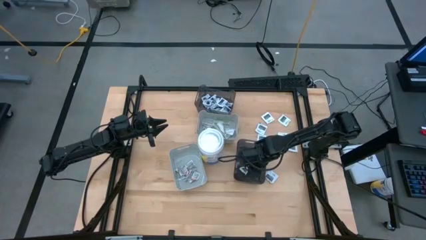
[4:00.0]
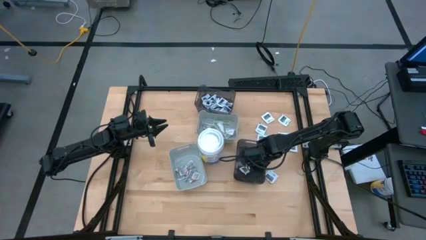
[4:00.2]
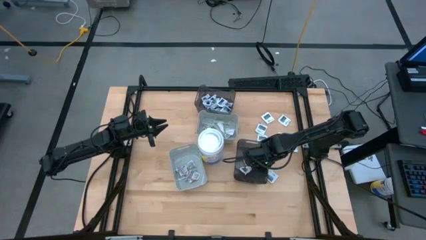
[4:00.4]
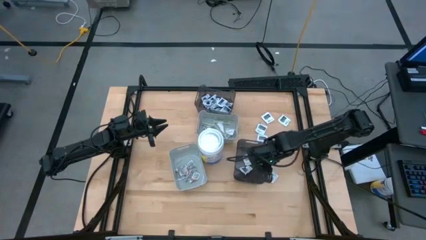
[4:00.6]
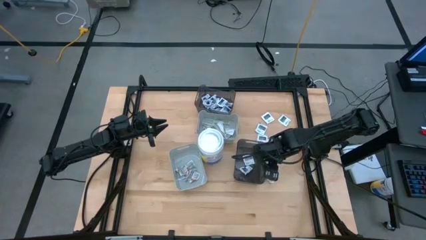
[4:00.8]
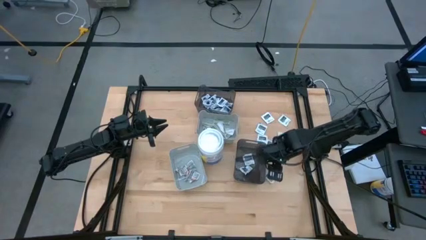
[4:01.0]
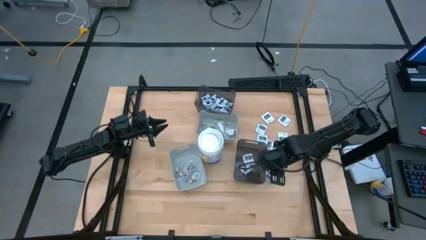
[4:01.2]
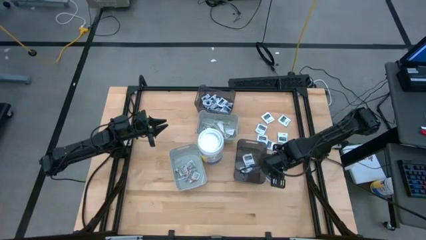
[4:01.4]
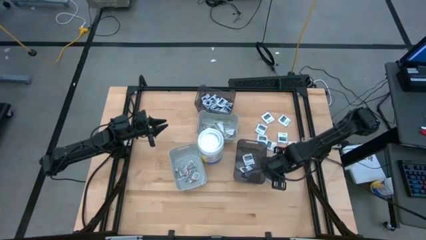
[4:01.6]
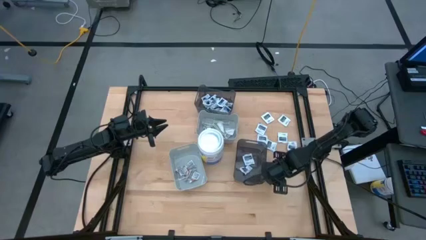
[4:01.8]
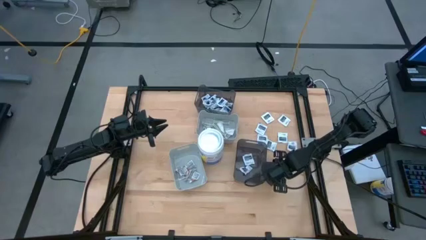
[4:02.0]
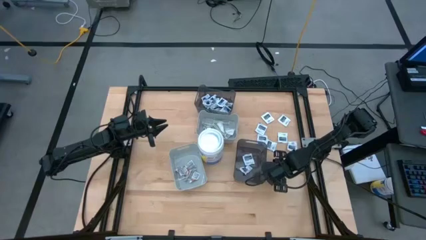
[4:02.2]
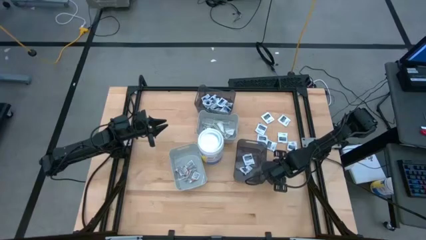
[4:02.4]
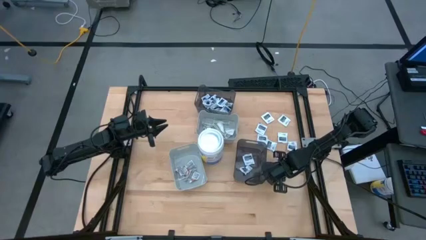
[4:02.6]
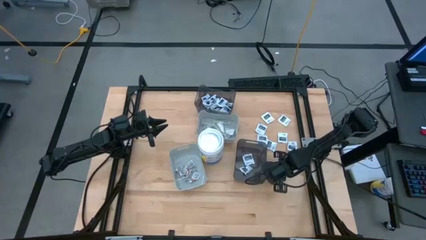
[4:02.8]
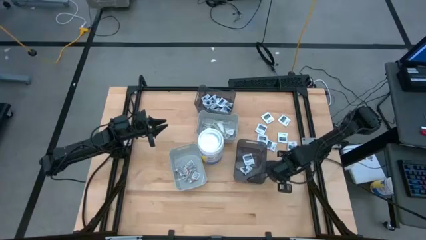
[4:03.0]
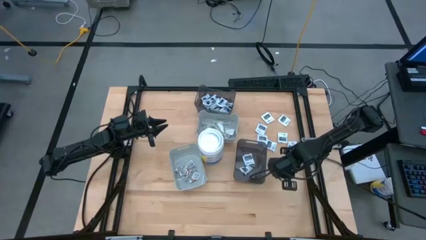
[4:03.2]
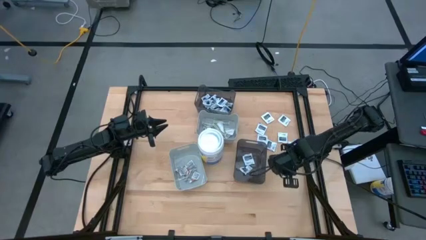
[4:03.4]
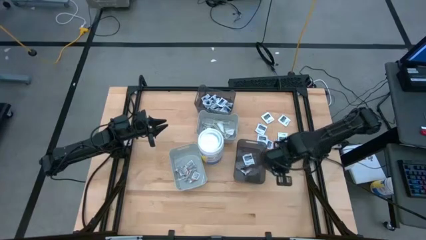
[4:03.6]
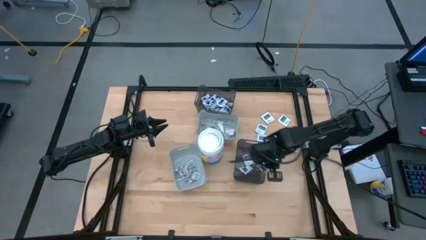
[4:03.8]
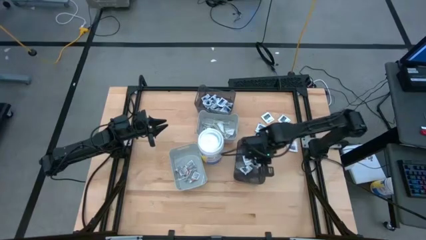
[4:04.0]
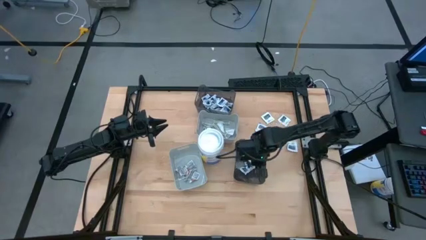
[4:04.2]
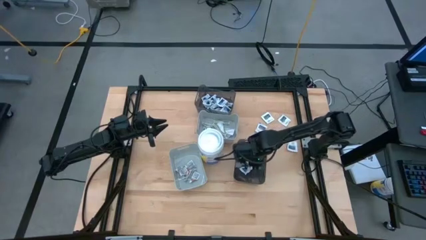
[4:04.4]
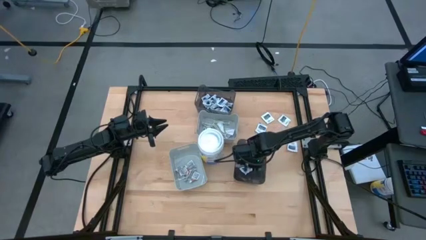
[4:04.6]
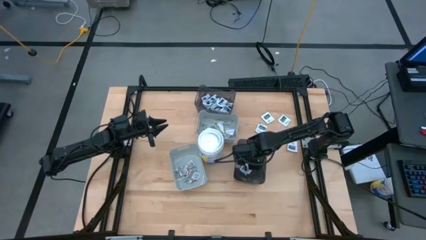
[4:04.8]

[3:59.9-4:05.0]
Task: Pick & Place First Aid Supplies
Put the towelette pack into the bottom transparent black bin

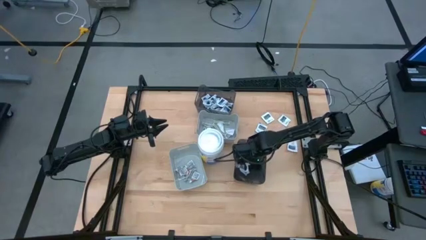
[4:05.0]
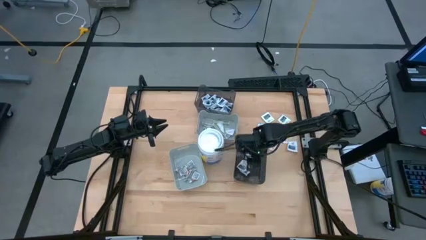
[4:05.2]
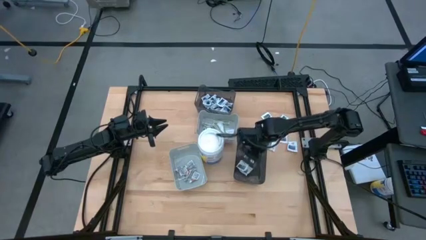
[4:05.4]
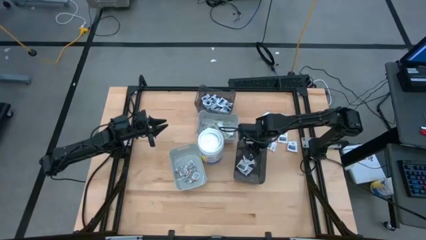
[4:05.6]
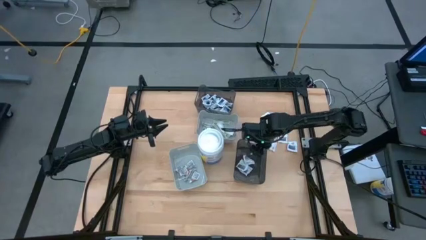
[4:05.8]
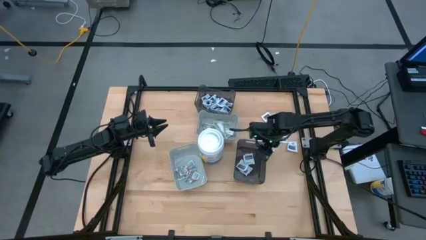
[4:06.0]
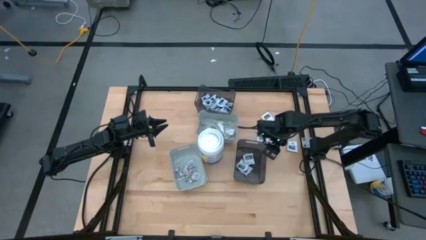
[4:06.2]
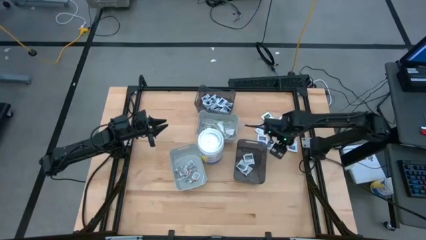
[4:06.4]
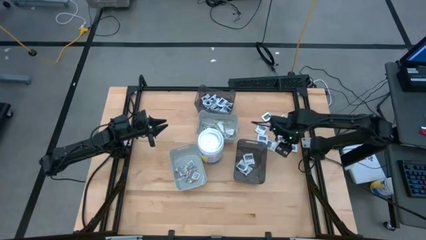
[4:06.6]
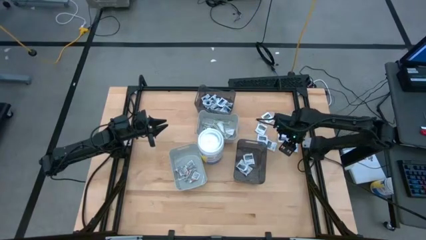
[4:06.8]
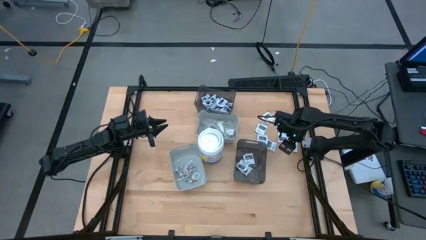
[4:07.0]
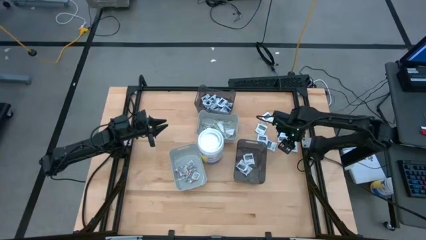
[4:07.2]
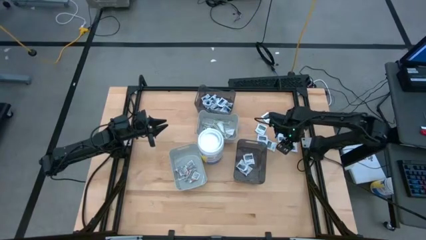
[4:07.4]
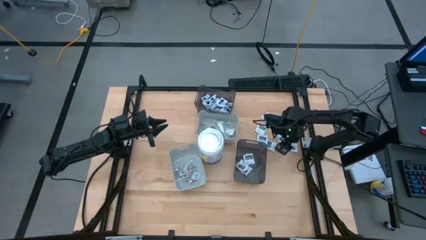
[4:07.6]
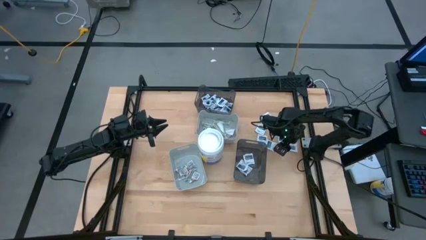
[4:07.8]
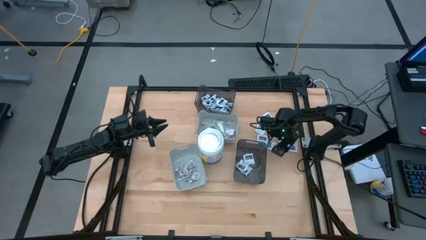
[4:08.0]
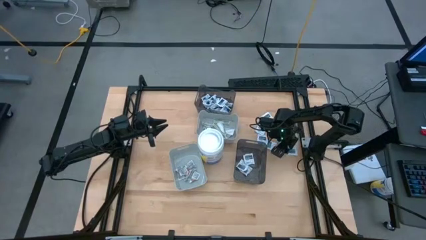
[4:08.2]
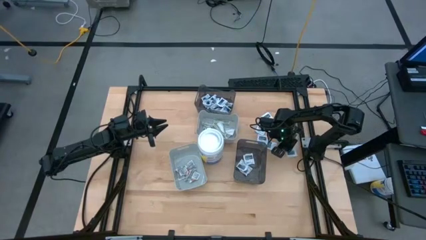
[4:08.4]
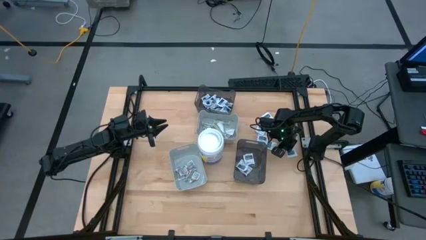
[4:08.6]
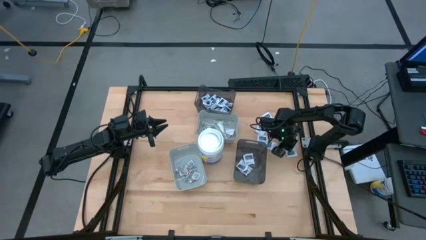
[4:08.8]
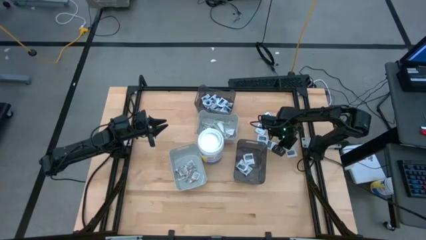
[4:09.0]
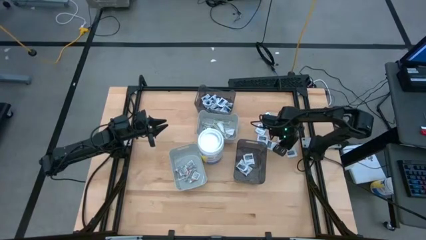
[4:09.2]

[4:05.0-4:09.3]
Put the towelette pack into the bottom transparent black bin

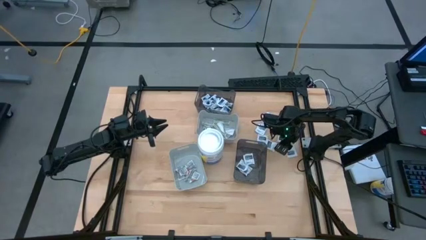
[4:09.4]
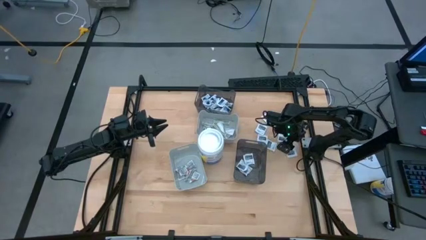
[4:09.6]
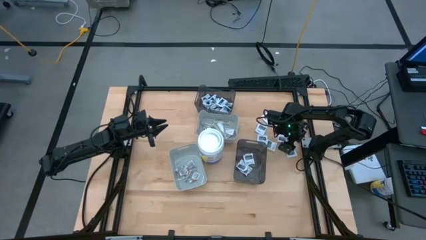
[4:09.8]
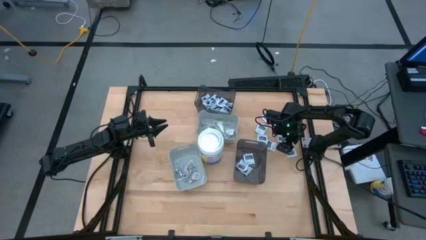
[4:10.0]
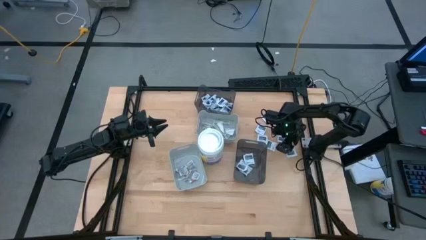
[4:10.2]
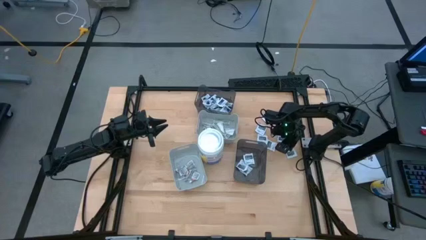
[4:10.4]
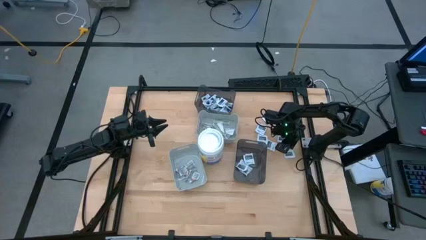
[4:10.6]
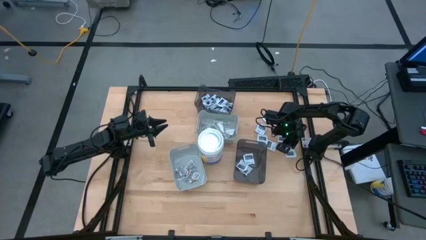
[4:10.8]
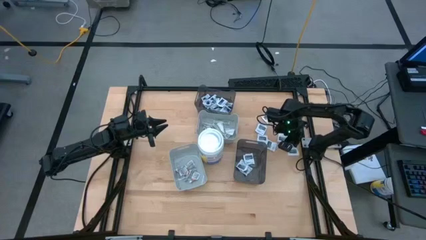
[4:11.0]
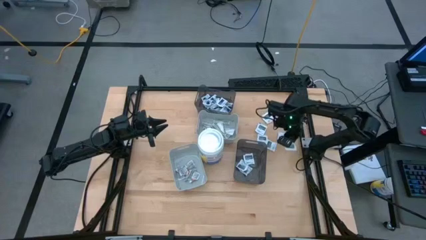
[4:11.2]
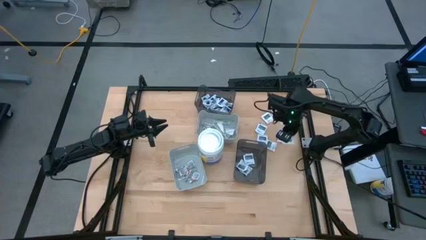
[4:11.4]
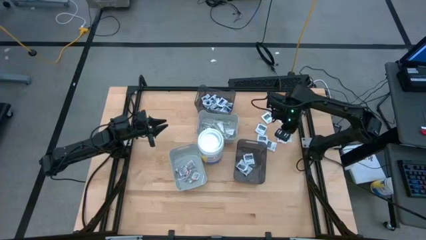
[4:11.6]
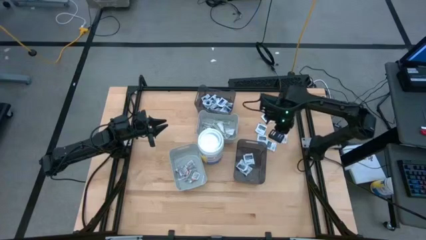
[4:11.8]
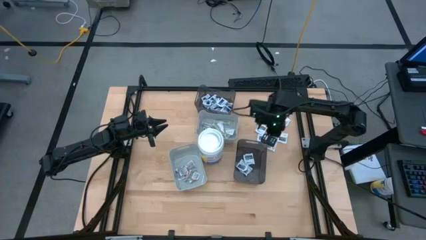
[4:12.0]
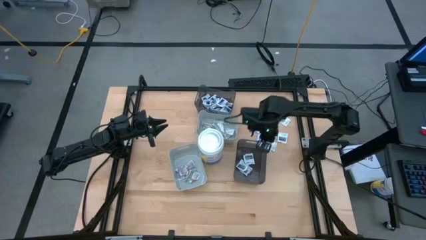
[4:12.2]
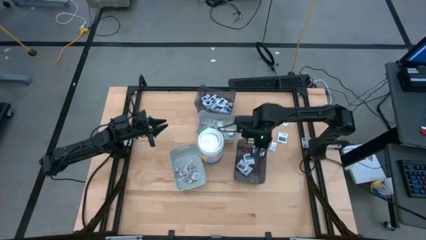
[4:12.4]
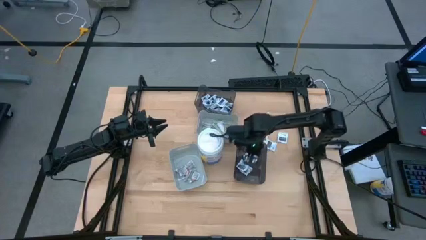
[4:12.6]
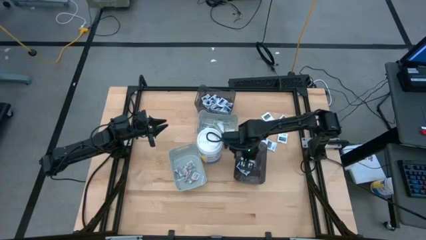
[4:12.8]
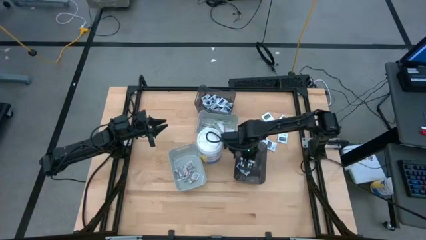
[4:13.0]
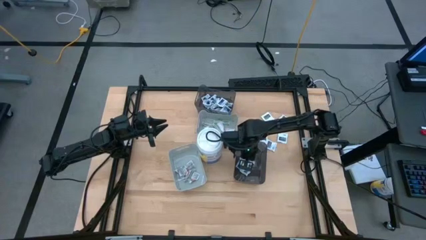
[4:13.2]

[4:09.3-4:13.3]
Put the towelette pack into the bottom transparent black bin

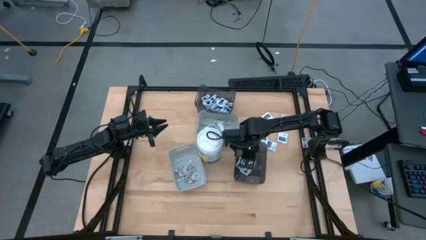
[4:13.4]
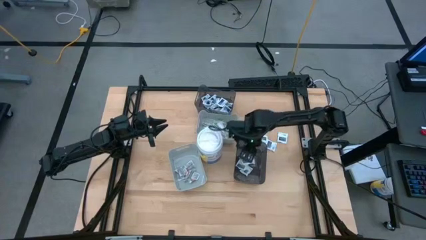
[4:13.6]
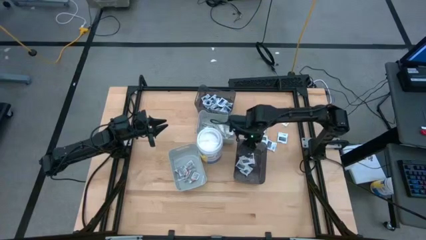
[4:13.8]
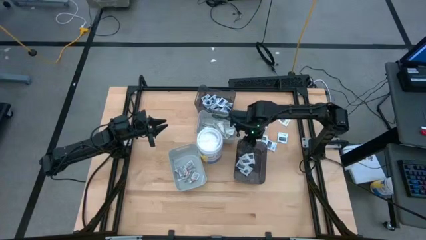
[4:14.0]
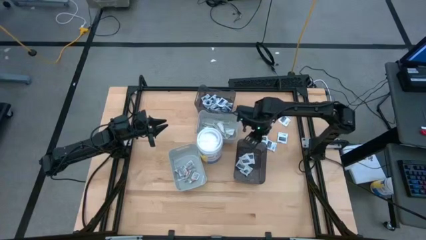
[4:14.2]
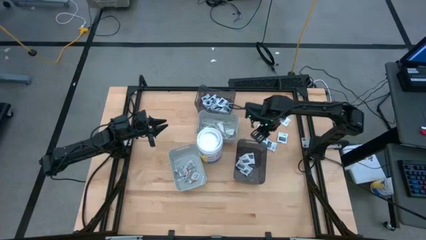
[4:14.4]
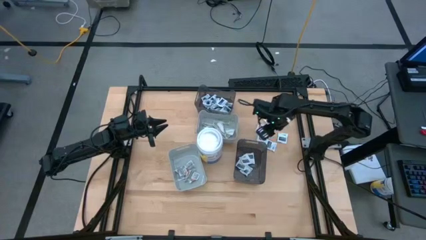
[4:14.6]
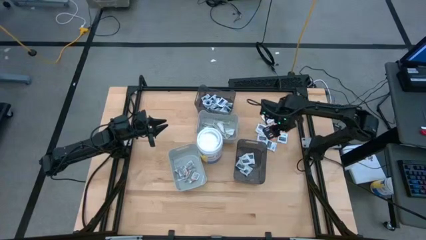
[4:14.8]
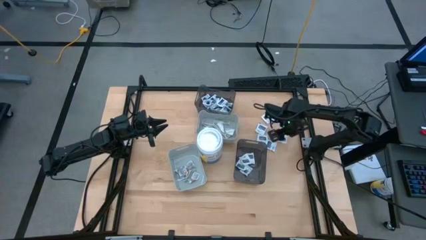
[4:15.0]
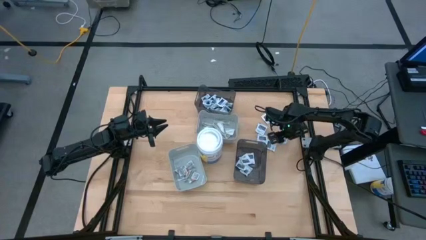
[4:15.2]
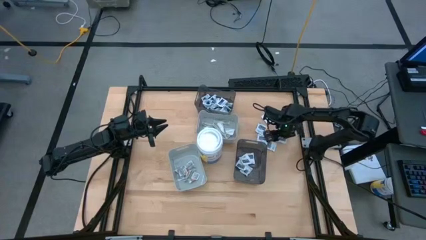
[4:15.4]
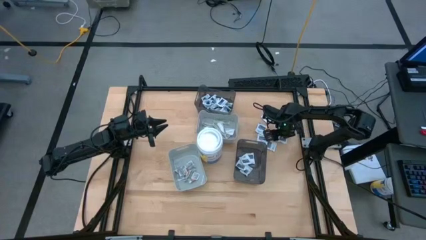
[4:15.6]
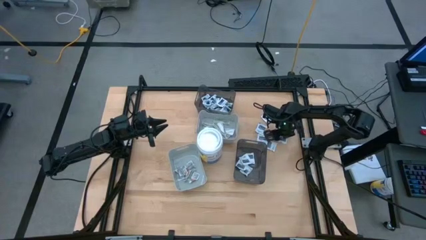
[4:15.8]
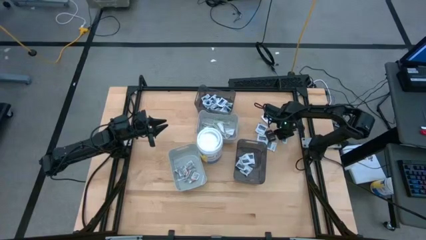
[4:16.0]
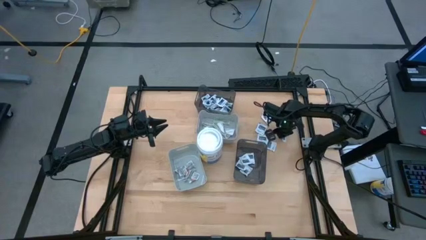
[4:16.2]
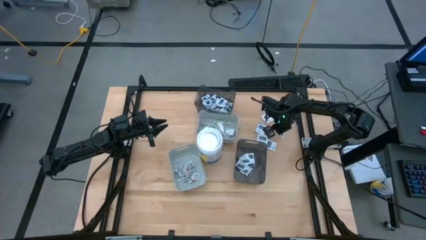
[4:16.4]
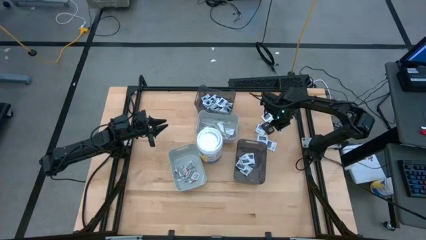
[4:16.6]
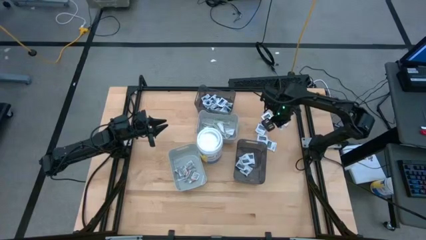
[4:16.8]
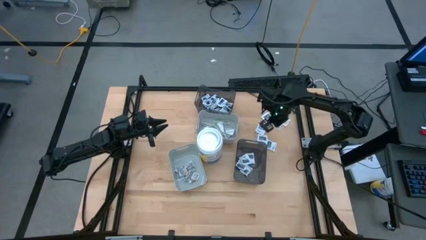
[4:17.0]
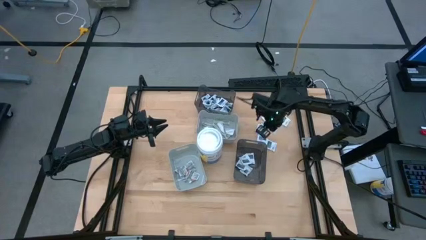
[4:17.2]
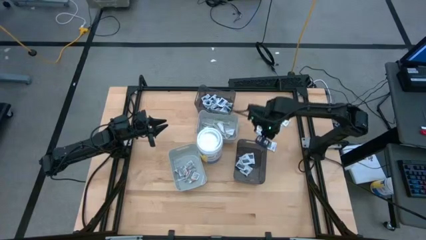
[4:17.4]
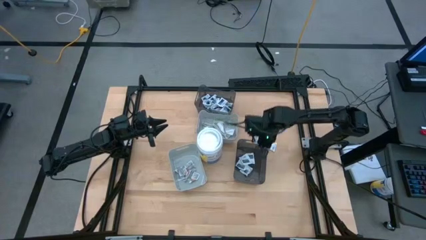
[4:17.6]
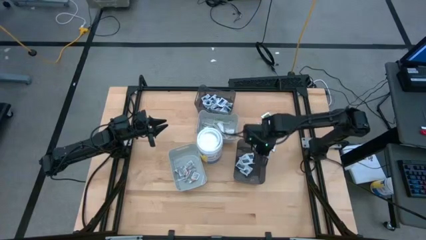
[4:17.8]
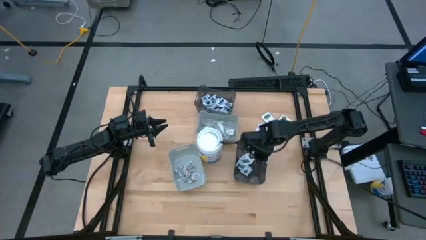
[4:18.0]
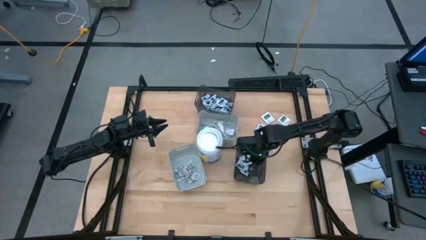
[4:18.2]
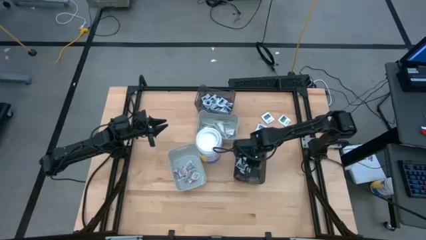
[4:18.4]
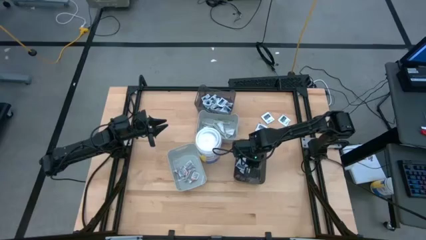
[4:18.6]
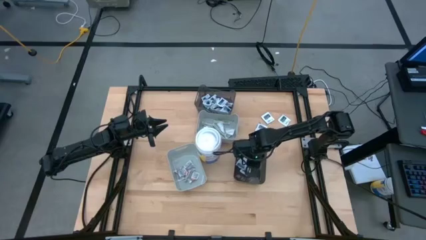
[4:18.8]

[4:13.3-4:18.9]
Put the towelette pack into the bottom transparent black bin
